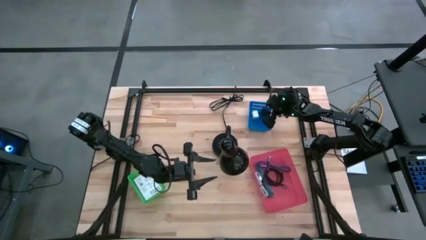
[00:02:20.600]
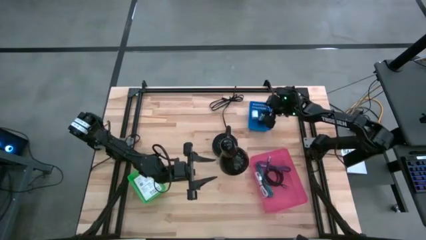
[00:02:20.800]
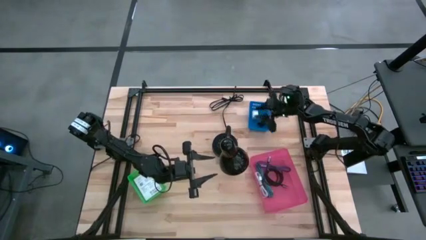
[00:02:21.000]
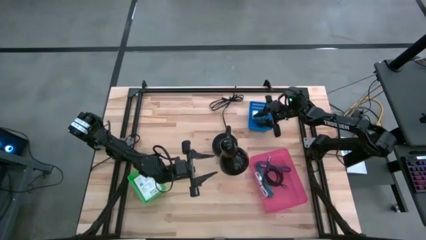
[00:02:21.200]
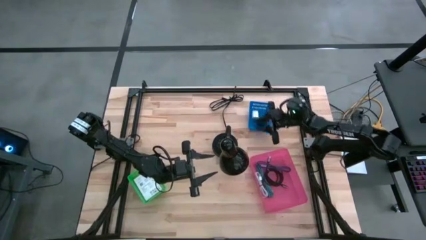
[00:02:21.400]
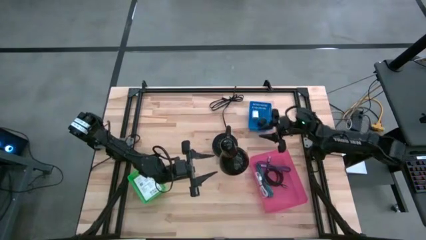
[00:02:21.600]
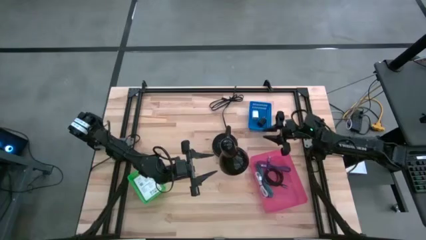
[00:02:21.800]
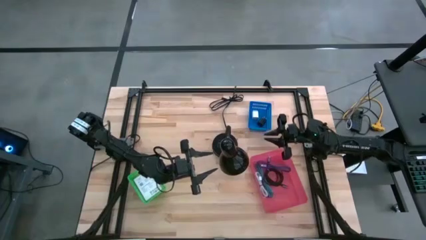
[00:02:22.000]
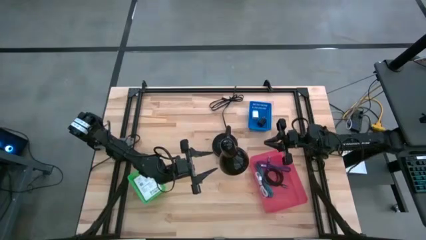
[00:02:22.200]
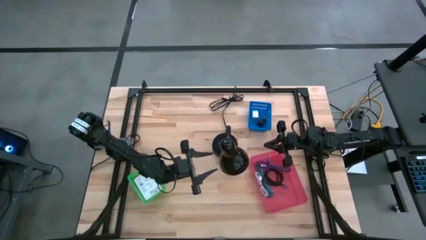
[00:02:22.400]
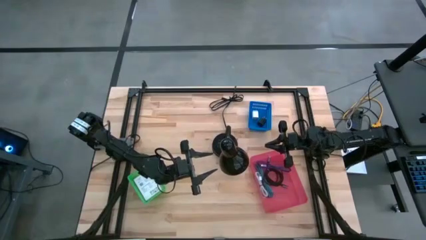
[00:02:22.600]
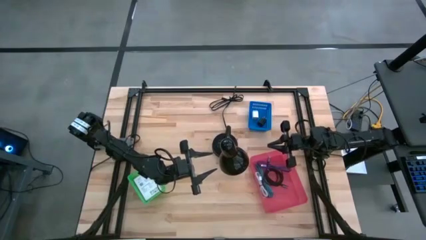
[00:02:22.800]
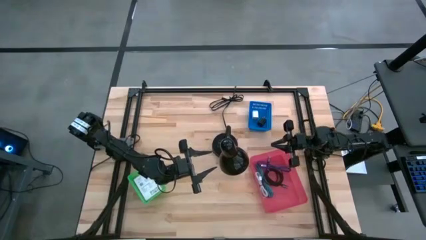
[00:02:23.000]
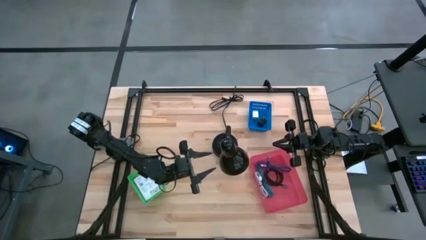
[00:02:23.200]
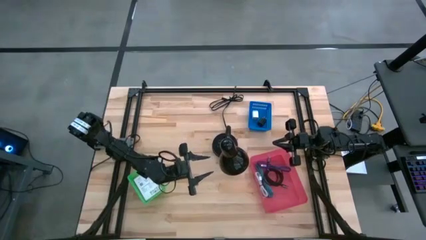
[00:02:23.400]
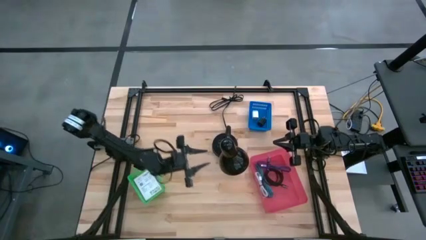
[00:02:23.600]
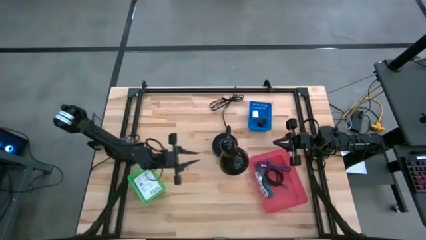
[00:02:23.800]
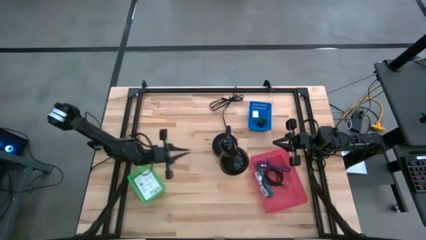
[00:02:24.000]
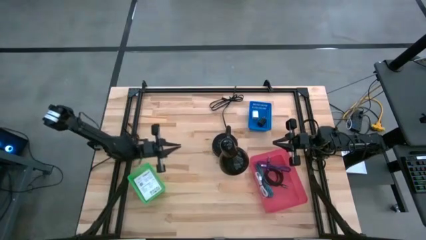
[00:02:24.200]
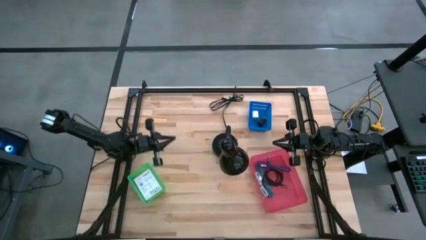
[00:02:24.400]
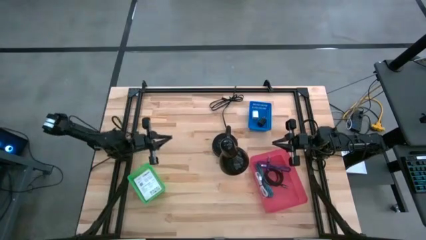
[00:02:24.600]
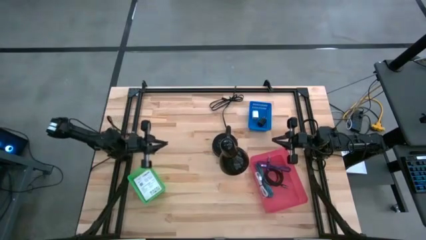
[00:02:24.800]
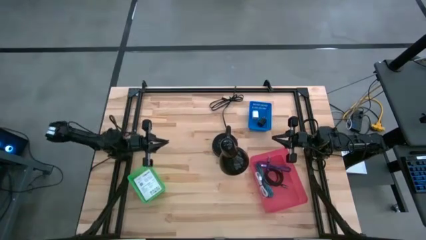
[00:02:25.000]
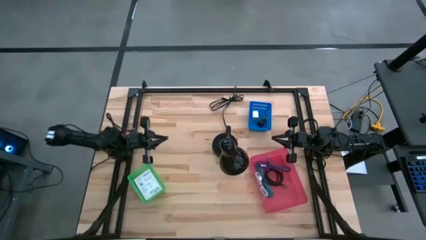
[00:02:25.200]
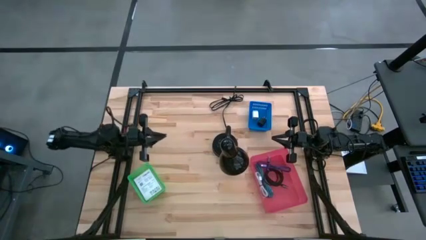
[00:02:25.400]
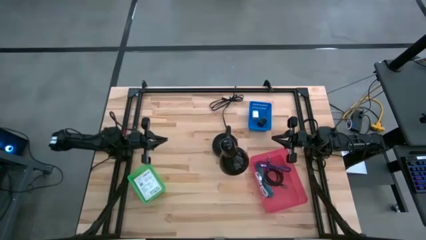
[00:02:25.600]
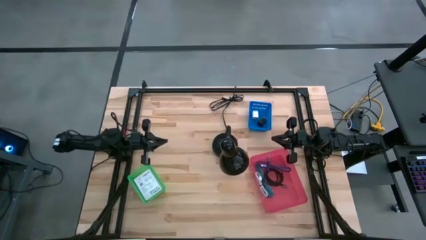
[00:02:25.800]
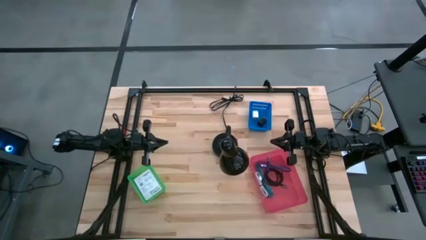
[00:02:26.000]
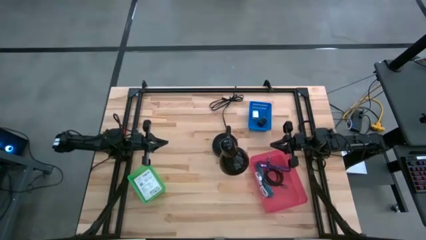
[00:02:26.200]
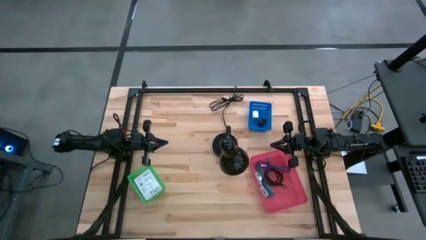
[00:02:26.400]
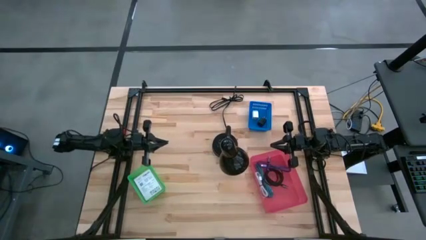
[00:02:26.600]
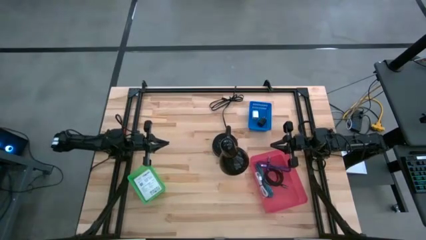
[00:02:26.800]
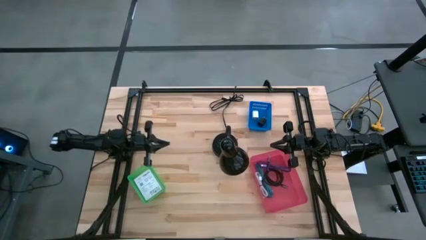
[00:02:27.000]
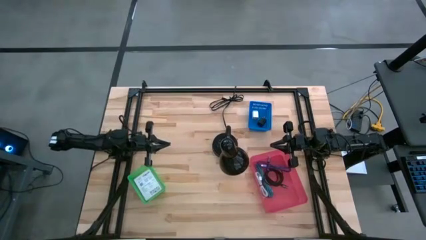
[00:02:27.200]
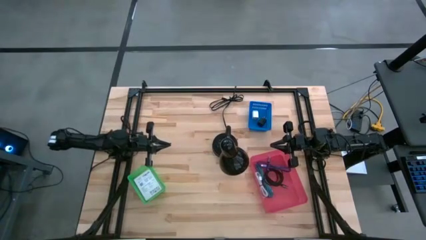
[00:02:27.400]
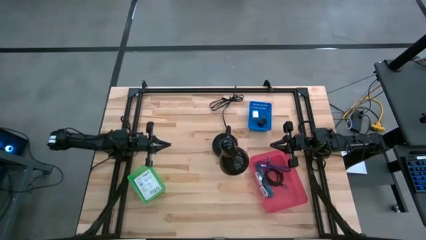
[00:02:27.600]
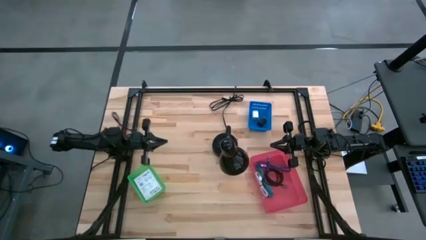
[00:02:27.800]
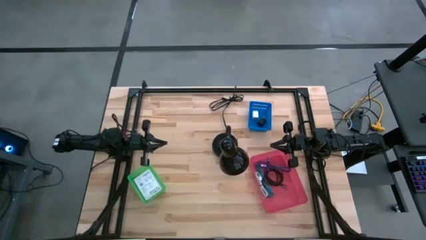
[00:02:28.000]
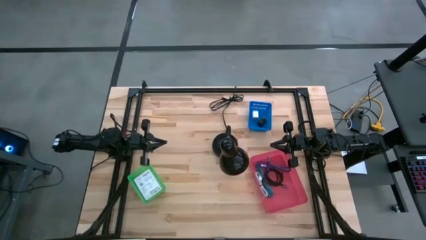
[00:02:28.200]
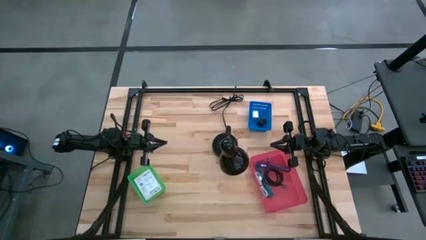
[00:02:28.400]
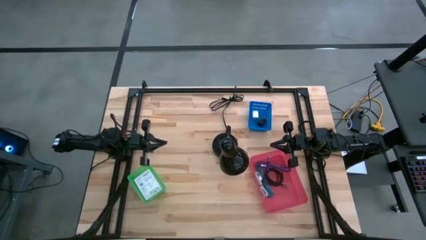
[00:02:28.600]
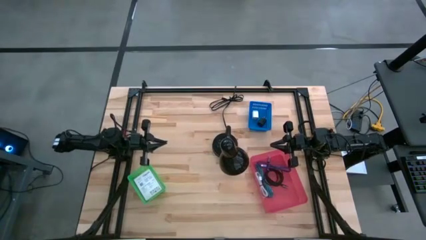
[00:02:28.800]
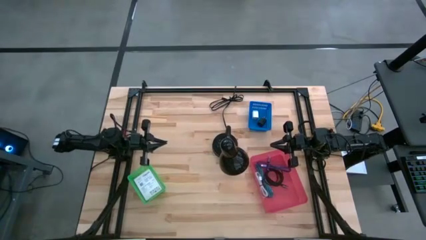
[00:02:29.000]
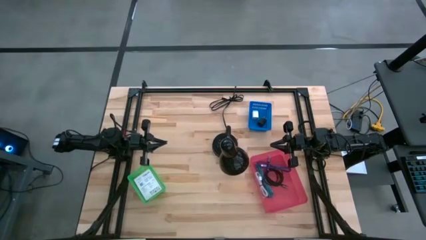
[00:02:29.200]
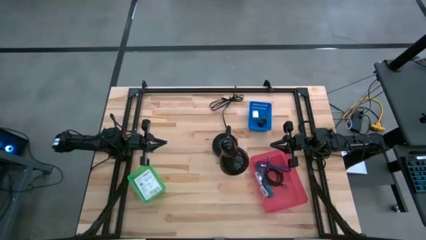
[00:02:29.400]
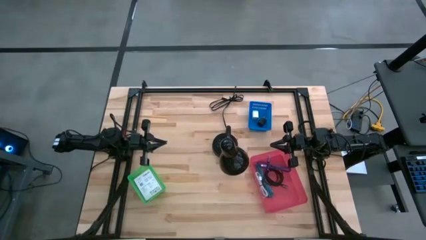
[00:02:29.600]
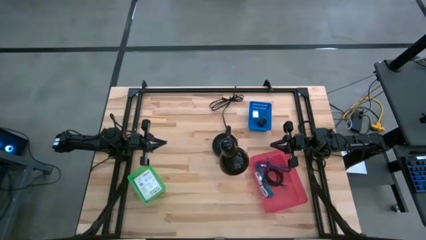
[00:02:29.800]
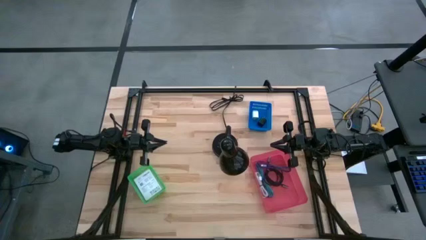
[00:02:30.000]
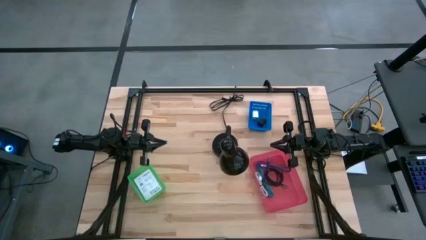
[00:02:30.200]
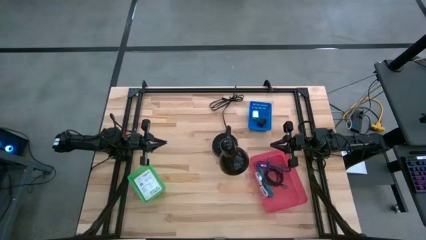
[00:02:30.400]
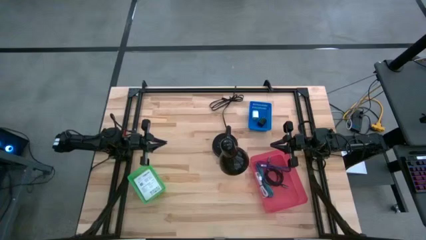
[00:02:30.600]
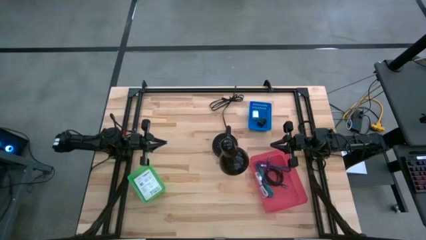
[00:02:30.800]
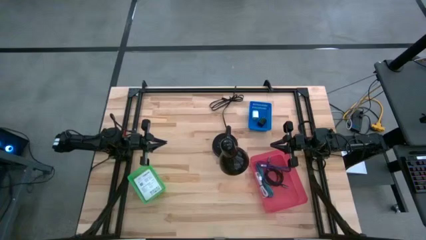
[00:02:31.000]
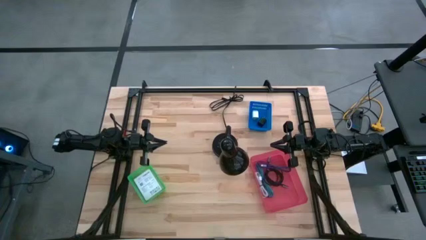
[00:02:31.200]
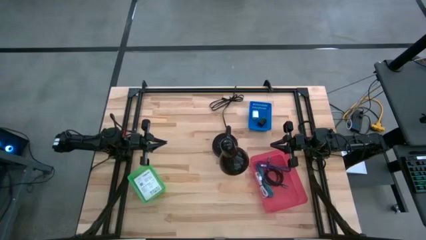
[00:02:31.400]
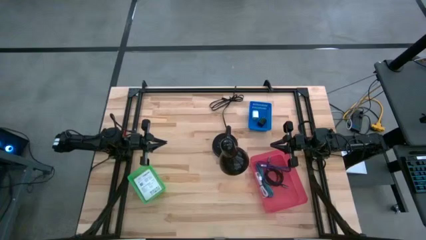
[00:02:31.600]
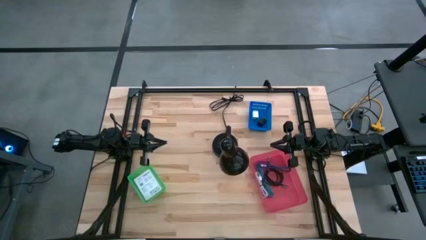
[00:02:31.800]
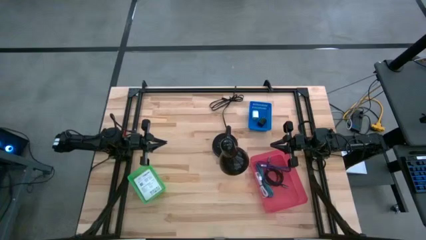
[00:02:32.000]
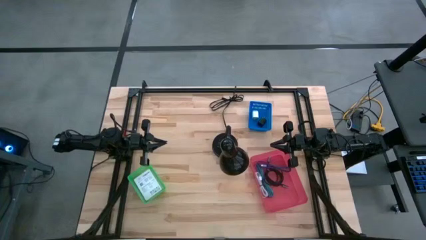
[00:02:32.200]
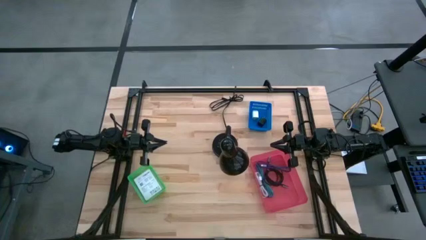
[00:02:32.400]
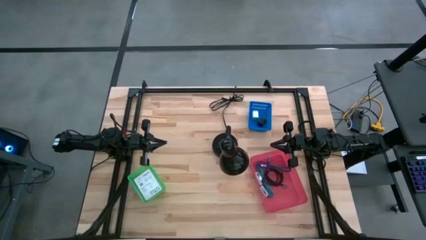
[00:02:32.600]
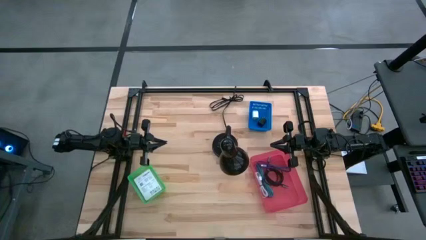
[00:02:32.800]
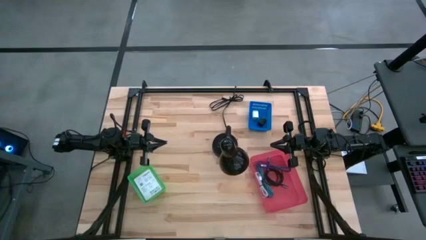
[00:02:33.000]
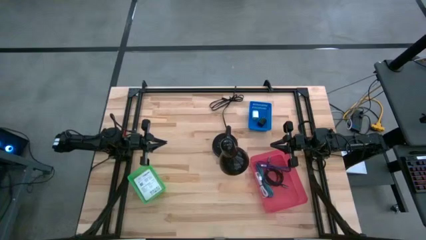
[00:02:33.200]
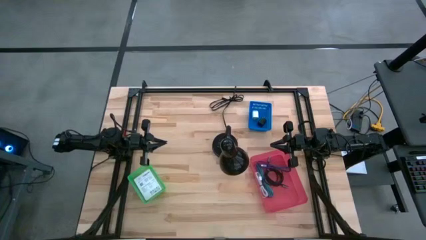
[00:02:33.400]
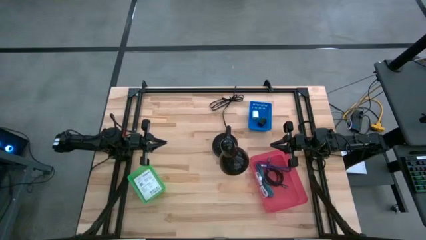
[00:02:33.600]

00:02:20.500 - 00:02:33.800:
Task: Pick and place items into bin
Return to Home Position

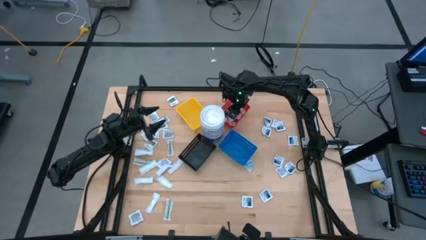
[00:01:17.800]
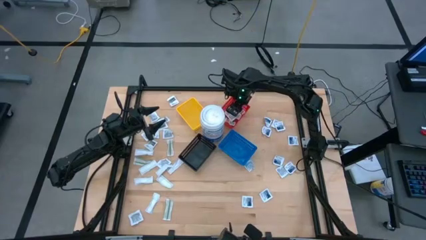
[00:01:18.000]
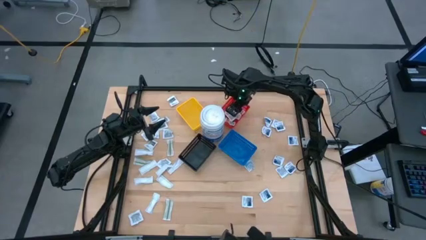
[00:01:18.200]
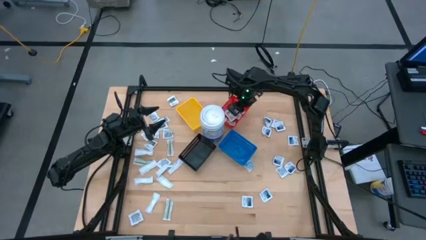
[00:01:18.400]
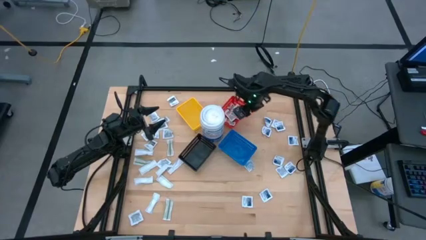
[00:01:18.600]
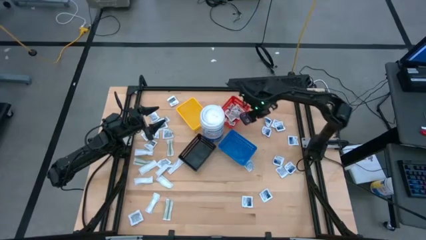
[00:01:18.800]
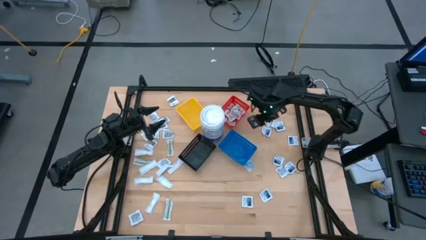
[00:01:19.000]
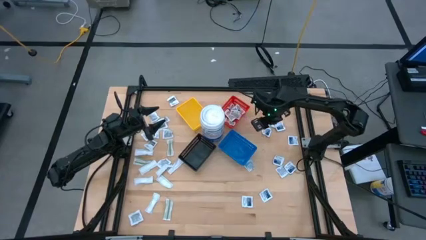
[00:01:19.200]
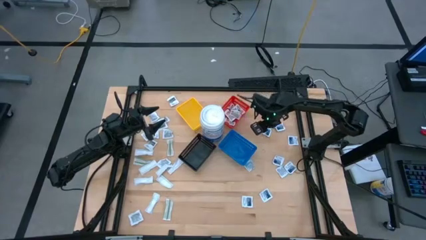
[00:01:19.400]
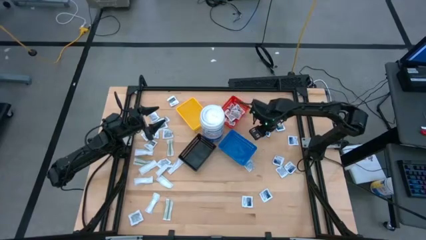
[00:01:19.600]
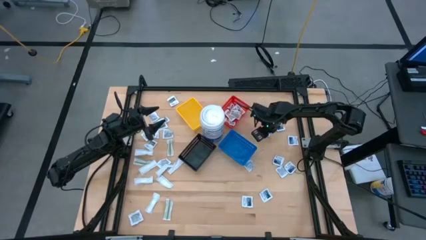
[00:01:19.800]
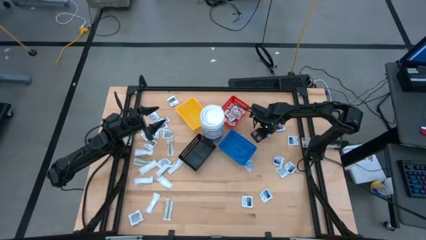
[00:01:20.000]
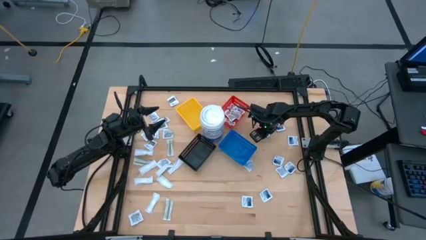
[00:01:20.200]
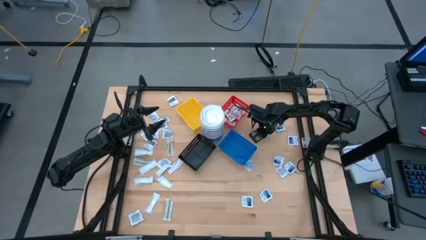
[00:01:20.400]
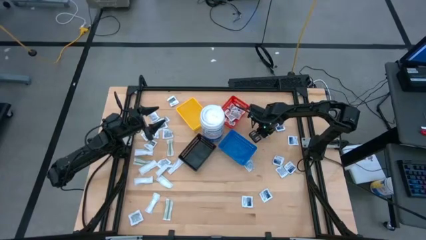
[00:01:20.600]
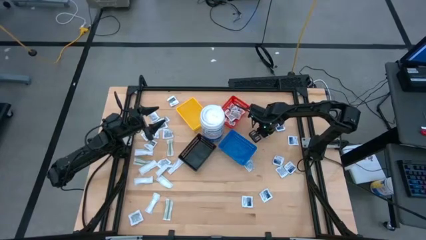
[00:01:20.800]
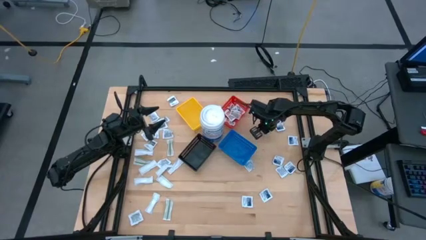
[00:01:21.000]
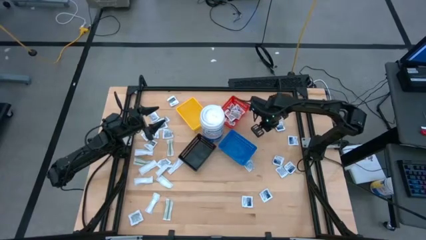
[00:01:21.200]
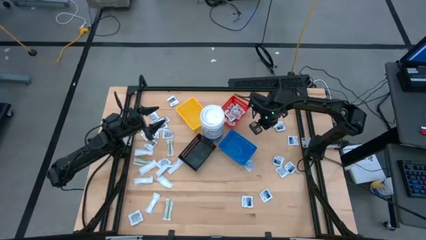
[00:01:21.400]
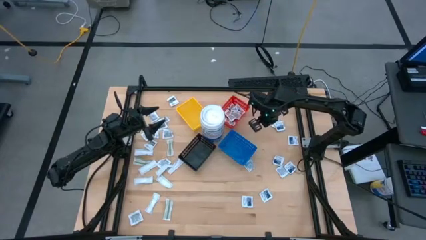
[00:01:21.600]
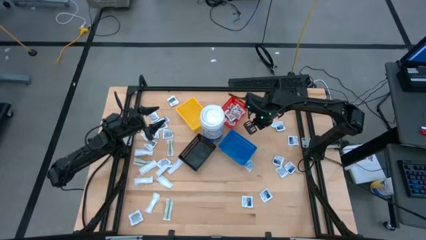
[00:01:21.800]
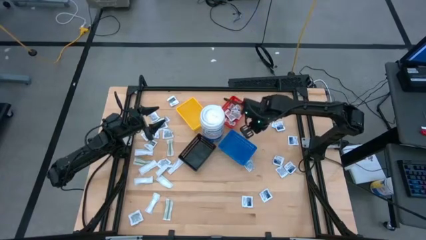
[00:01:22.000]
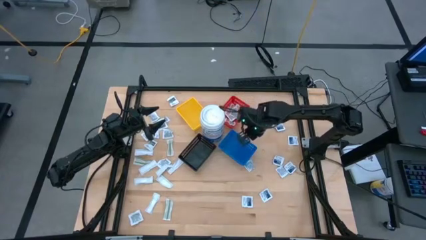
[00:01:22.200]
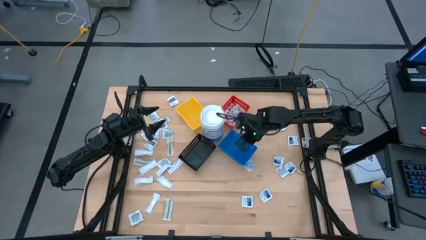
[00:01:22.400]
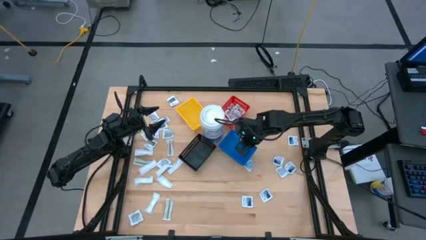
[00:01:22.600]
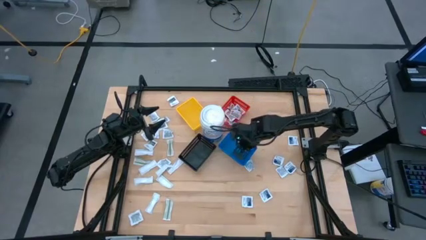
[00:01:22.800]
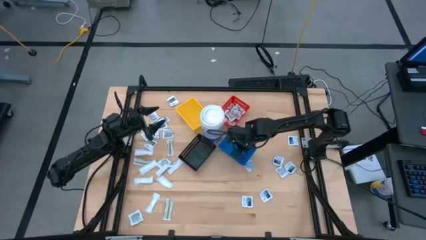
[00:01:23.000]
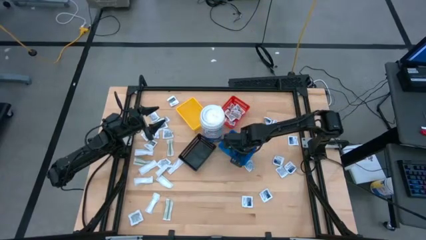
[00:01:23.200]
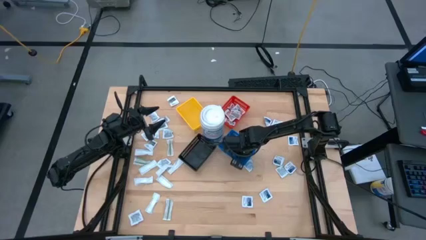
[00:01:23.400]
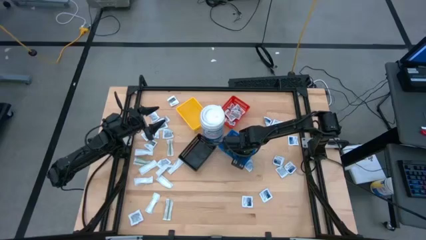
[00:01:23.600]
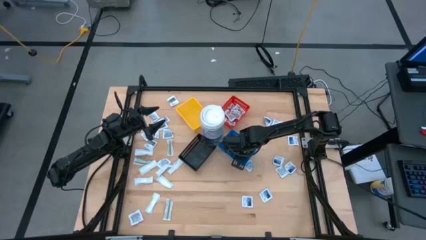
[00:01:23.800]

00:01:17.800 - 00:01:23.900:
Task: Pick & Place First Aid Supplies
Put the alcohol pad into the blue bin
